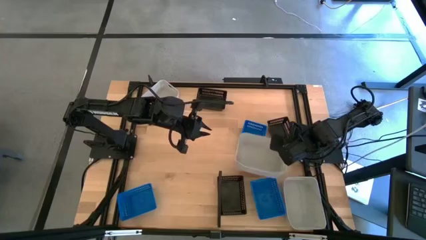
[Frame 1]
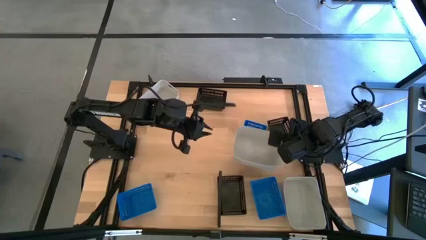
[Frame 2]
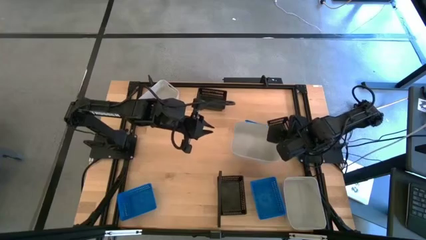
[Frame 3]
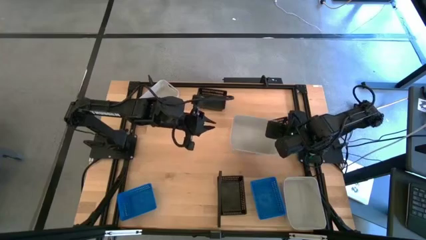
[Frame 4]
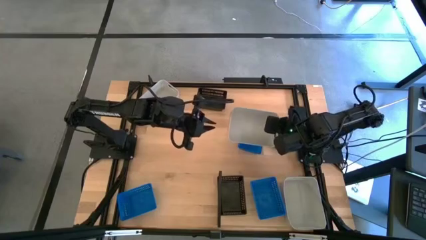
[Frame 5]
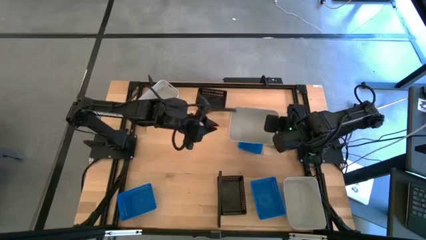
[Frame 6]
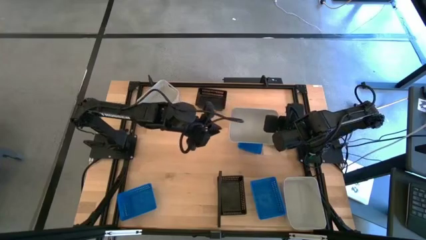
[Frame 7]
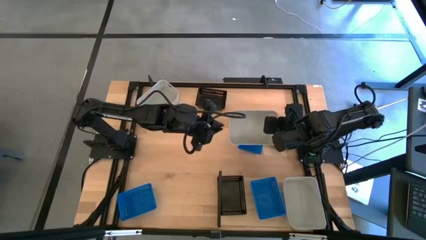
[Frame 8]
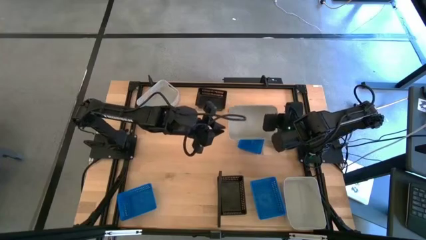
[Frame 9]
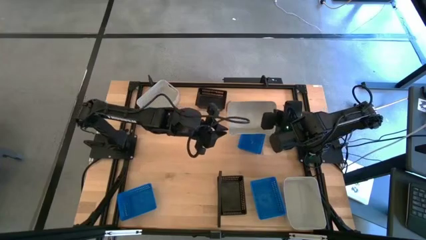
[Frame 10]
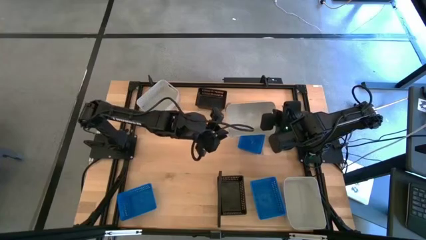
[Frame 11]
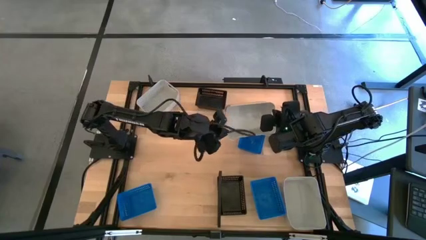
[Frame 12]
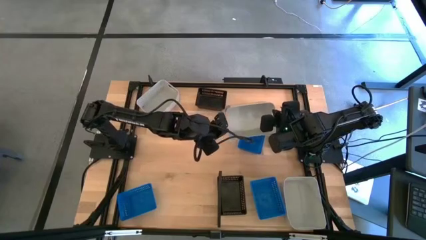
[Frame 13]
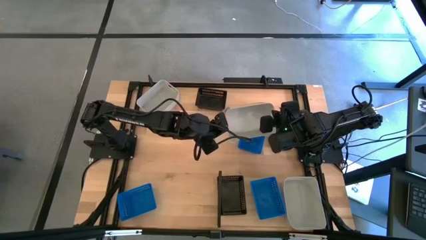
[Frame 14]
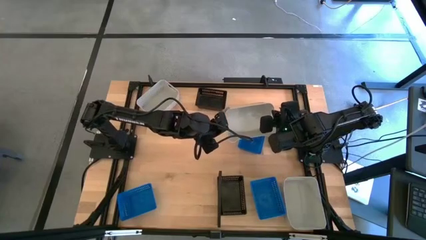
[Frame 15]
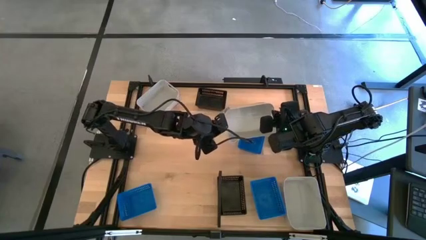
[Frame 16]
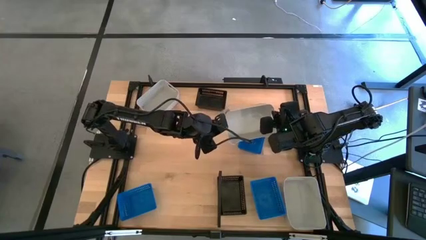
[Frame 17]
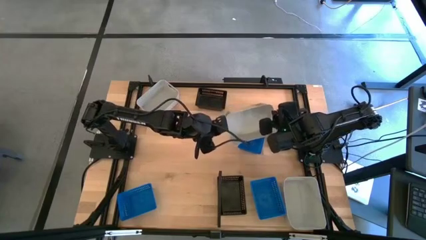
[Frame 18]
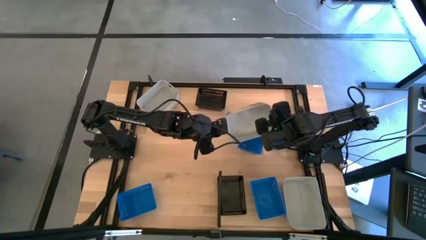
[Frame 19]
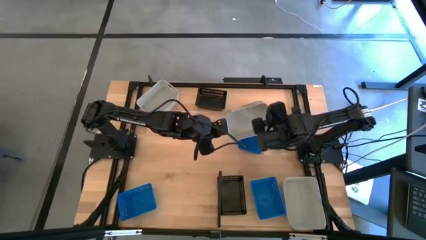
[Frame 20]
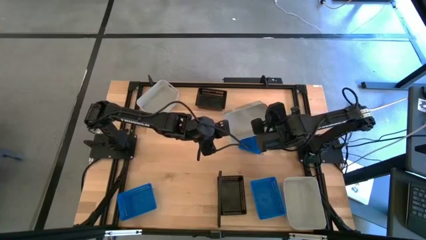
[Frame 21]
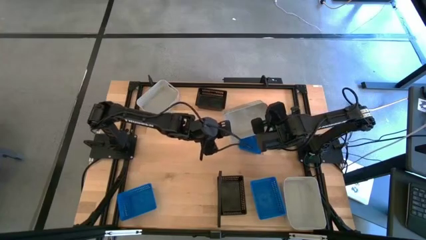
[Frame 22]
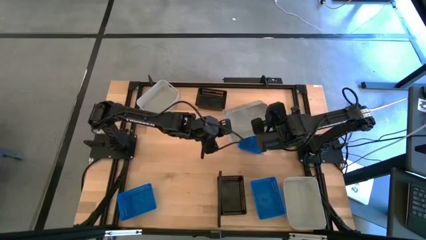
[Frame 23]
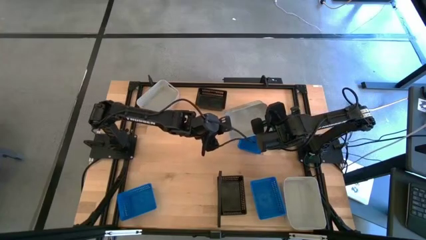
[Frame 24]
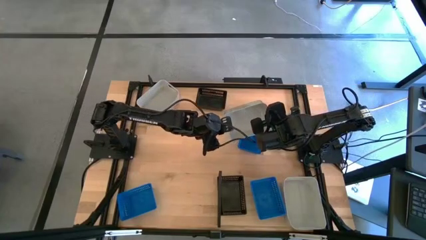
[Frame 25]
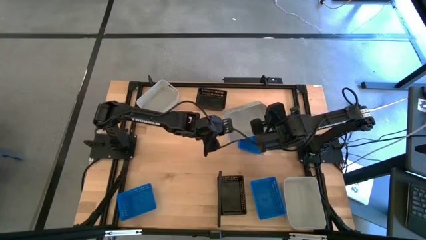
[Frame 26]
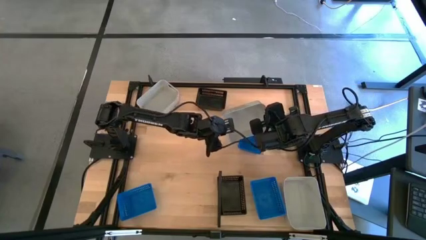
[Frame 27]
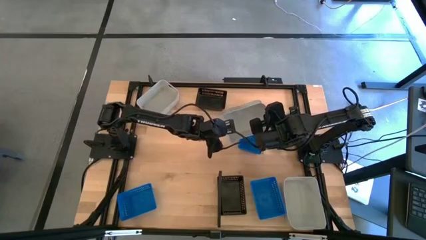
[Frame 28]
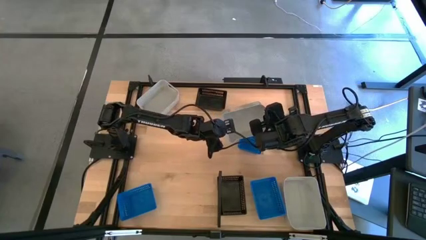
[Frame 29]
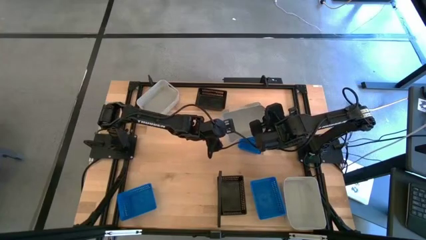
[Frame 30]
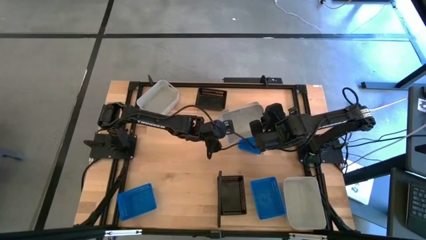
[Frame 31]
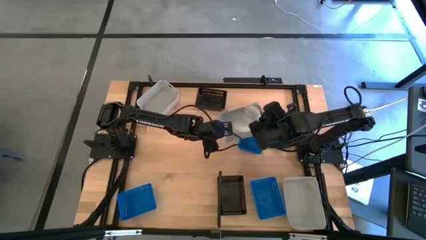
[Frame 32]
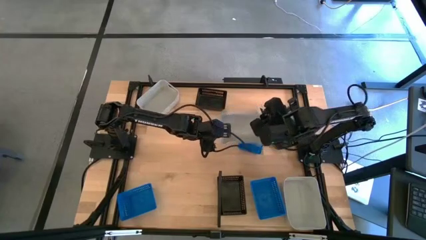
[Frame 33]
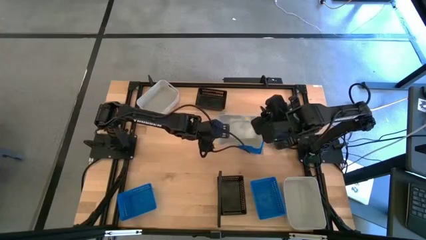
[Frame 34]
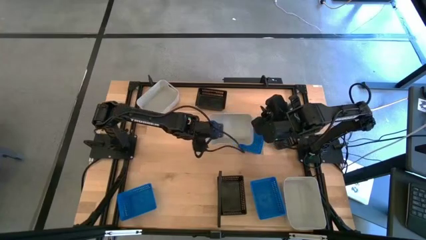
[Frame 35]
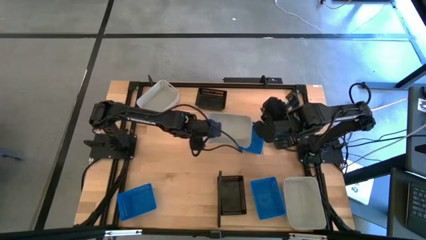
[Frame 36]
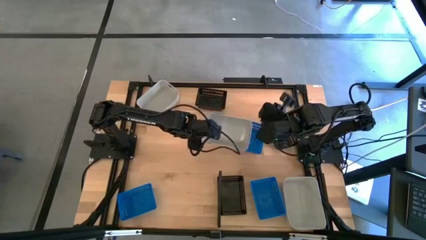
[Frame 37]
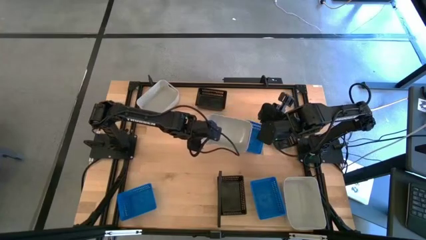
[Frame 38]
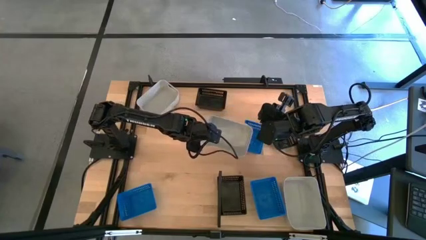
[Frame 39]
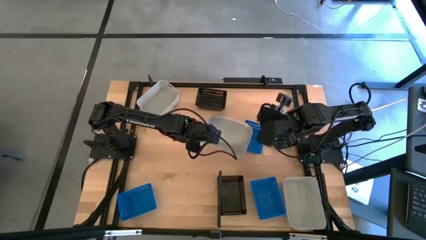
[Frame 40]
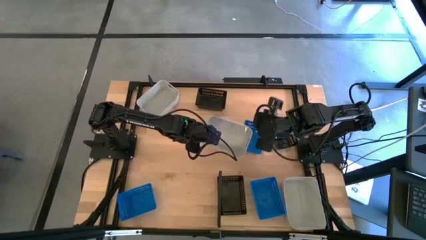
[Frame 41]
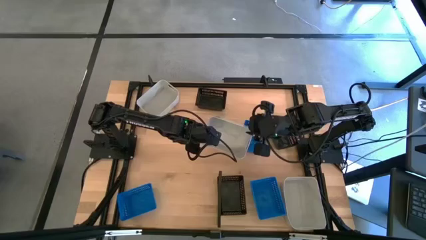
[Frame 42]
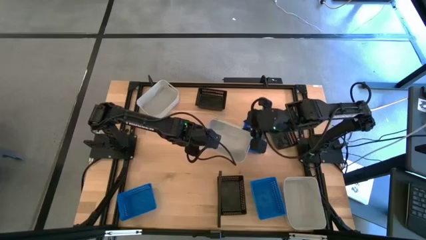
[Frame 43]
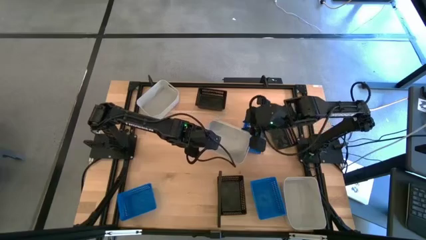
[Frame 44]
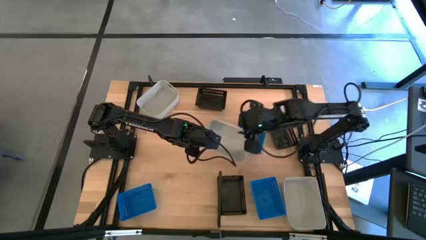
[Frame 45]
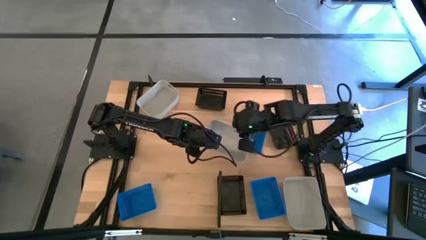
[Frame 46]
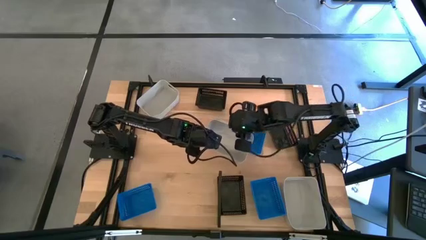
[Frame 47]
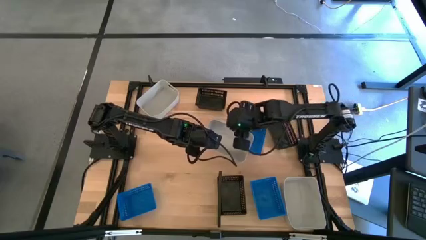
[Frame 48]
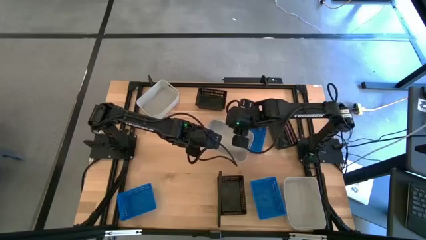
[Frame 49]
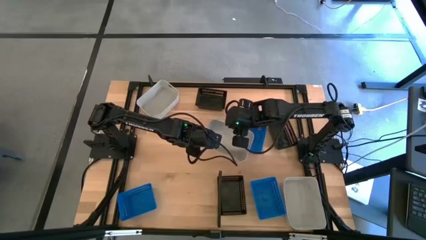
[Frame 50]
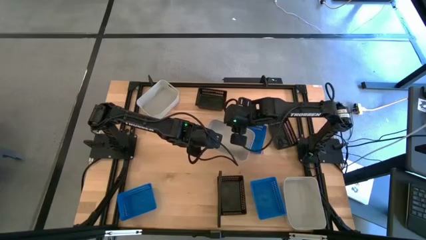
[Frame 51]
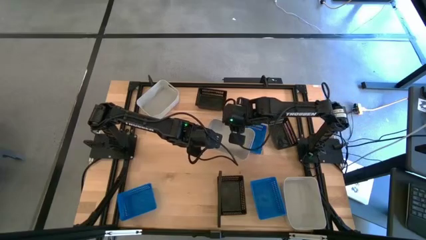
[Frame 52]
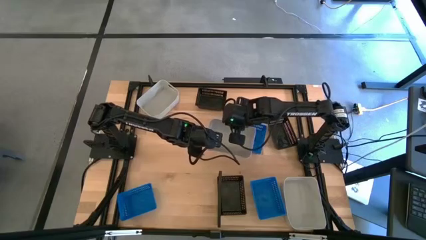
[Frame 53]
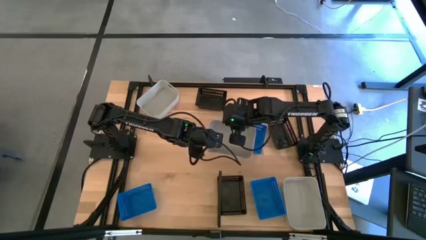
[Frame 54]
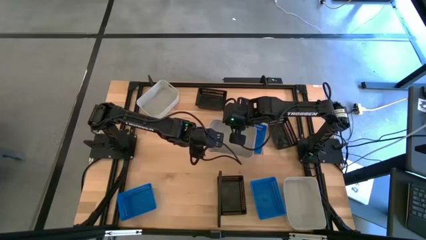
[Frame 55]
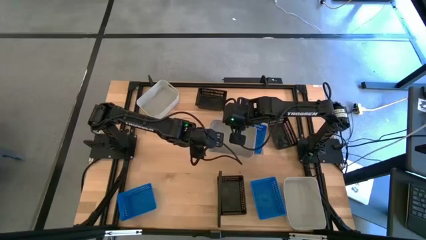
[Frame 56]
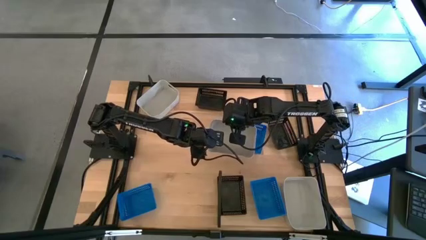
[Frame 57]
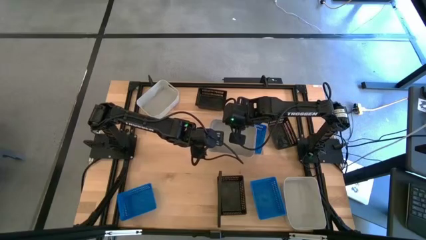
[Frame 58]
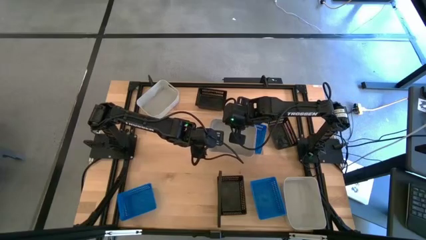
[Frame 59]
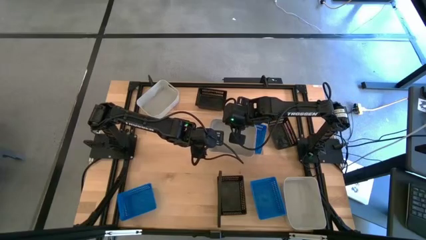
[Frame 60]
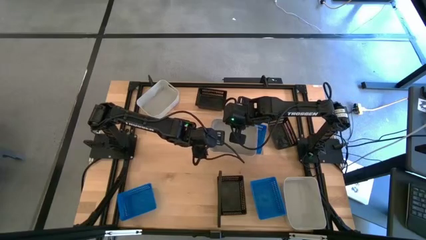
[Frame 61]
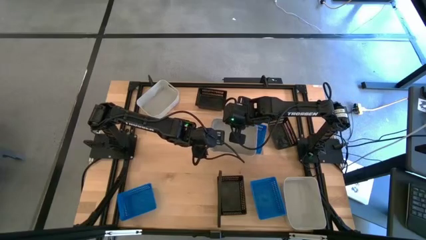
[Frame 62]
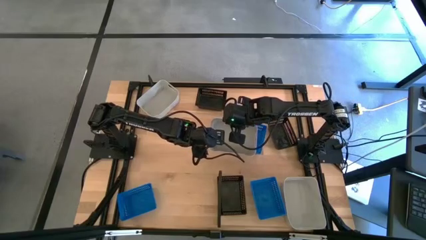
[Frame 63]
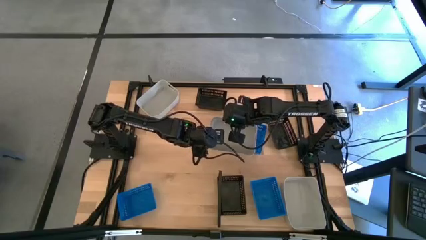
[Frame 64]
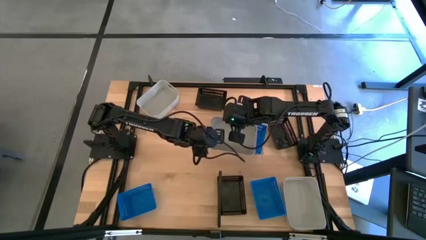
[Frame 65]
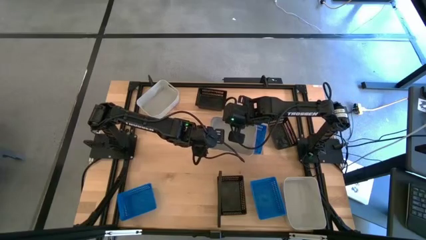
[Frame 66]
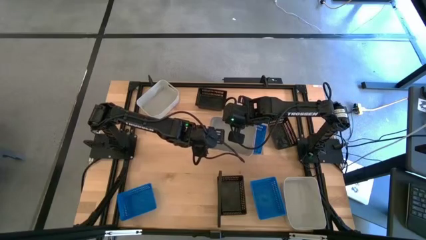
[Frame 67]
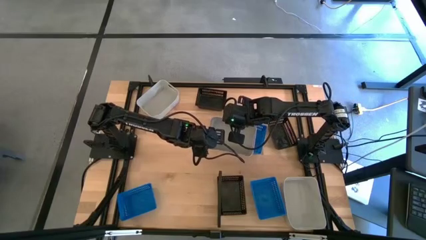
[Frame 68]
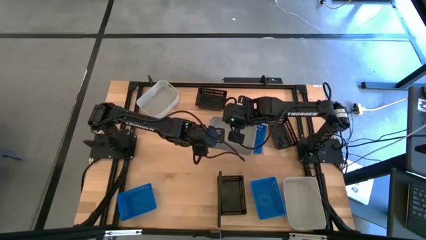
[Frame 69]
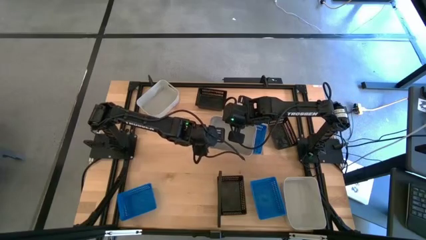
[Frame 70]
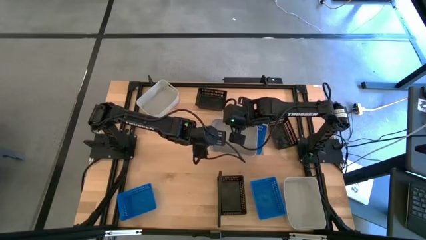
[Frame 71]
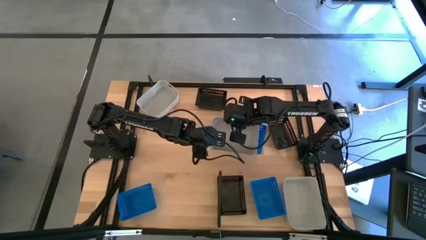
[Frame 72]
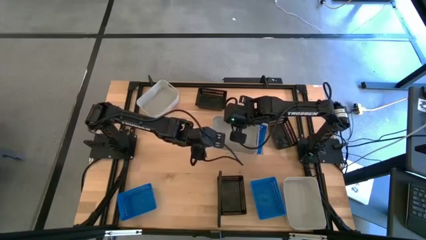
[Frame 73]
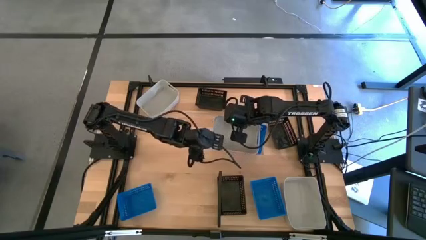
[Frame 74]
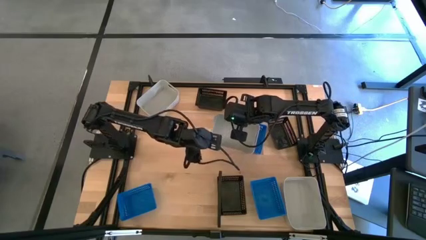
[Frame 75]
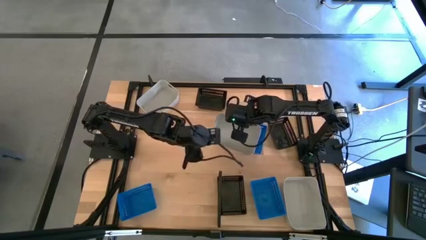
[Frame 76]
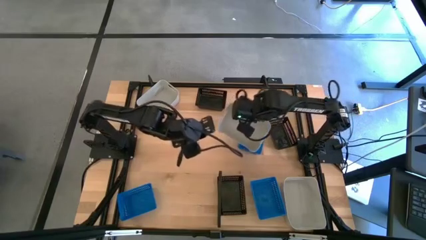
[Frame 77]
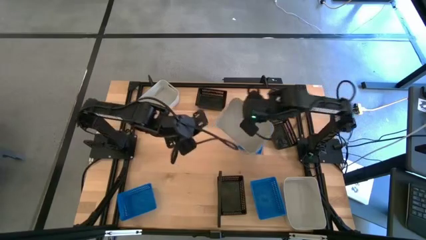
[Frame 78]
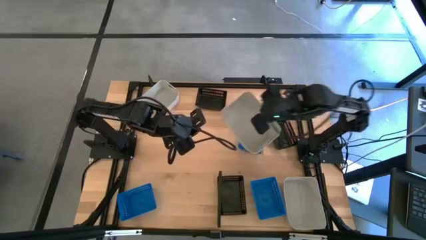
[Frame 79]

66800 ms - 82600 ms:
Task: Stack baskets on shelf by color
Stack the bottom gray bin on top of the gray bin on the shelf
